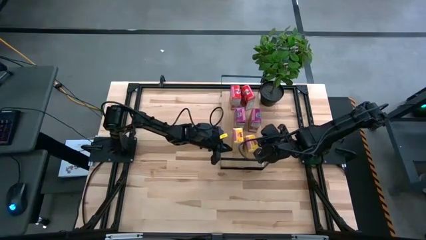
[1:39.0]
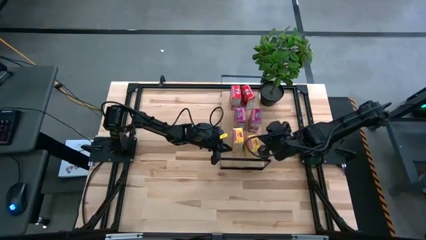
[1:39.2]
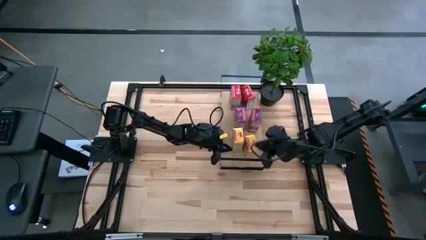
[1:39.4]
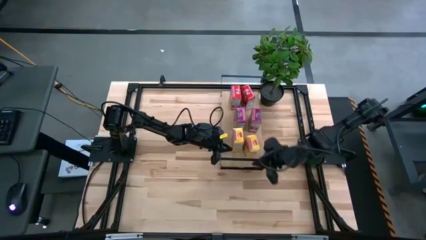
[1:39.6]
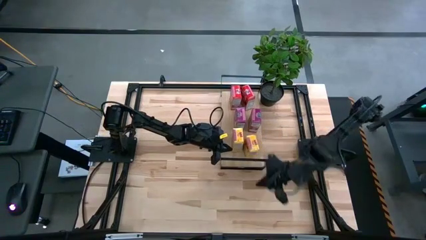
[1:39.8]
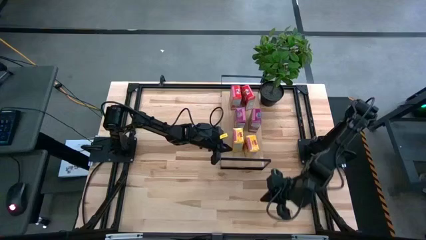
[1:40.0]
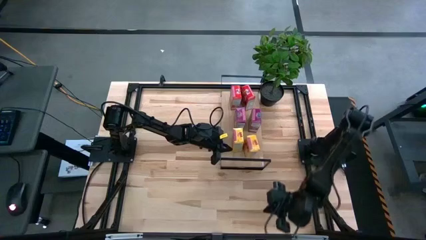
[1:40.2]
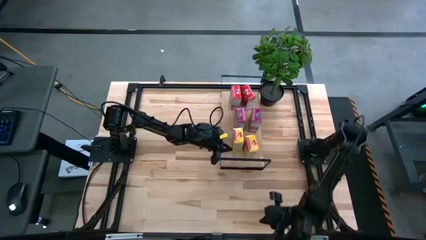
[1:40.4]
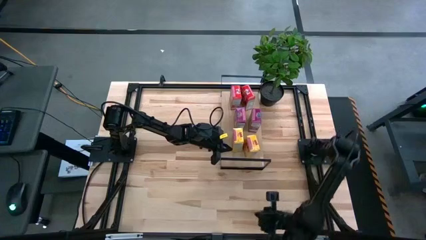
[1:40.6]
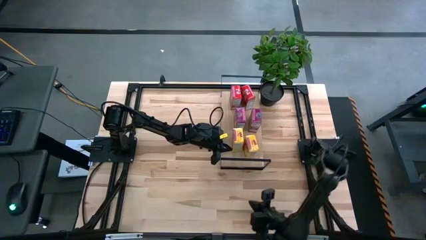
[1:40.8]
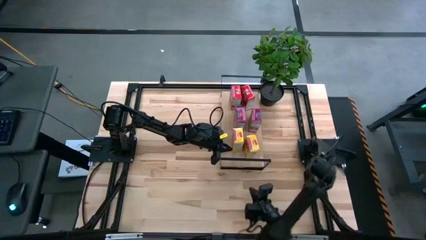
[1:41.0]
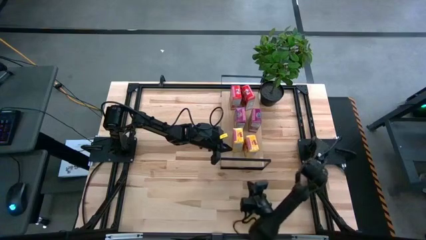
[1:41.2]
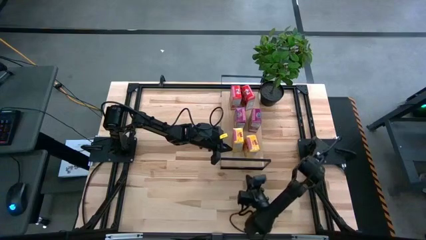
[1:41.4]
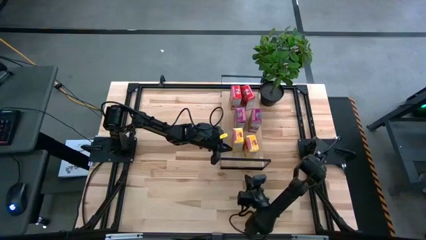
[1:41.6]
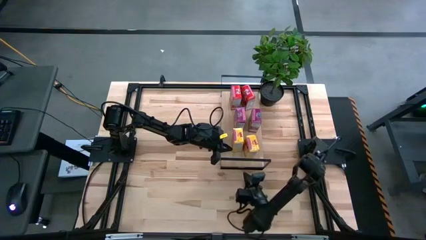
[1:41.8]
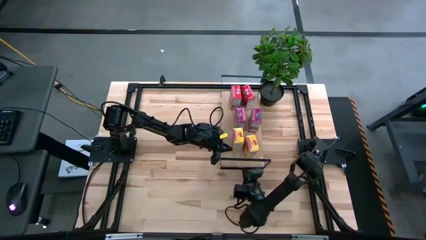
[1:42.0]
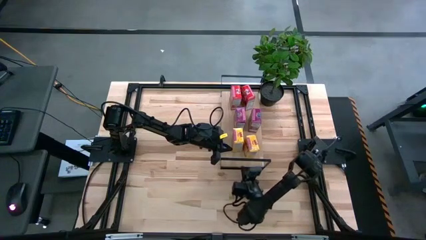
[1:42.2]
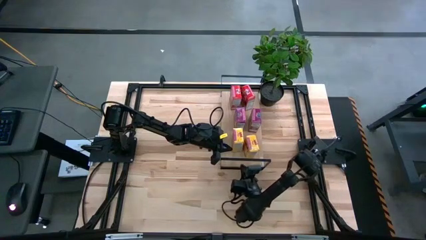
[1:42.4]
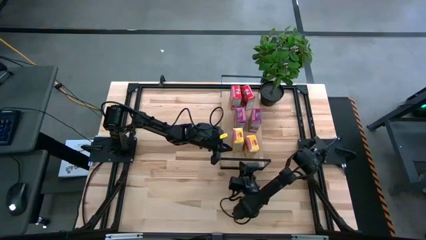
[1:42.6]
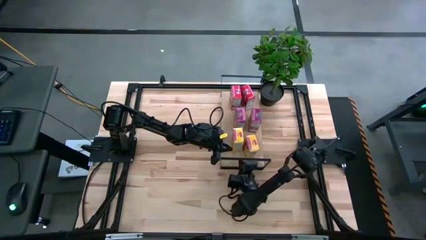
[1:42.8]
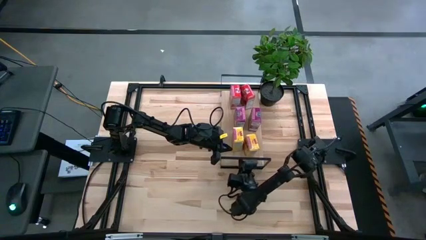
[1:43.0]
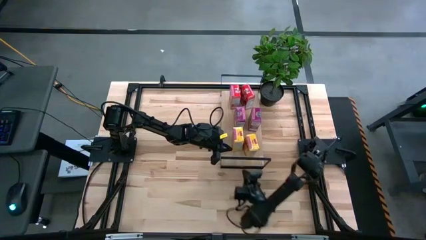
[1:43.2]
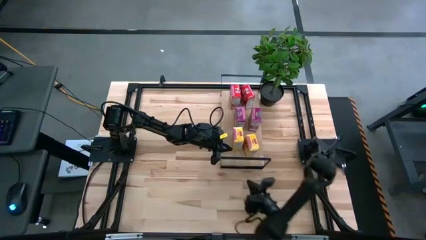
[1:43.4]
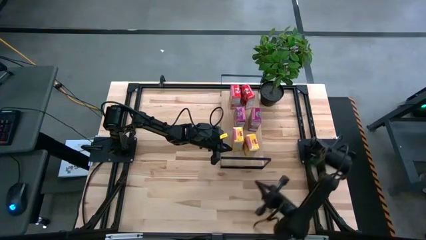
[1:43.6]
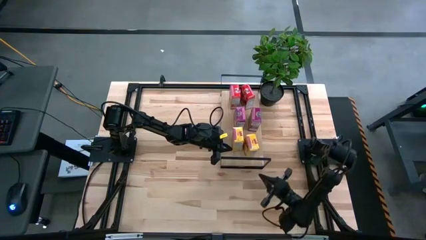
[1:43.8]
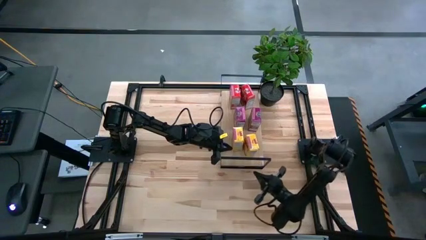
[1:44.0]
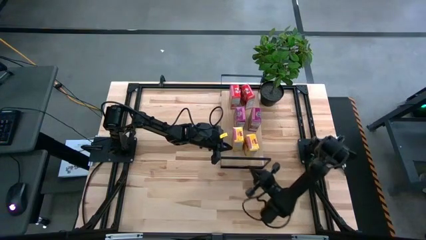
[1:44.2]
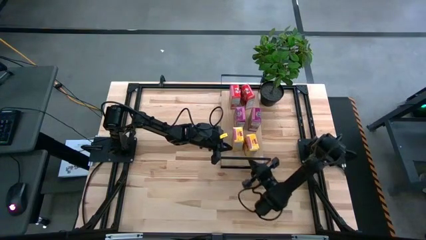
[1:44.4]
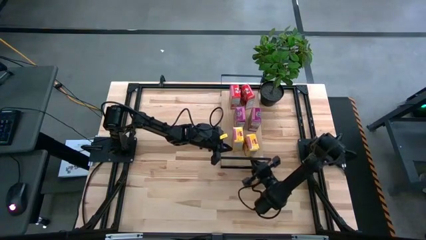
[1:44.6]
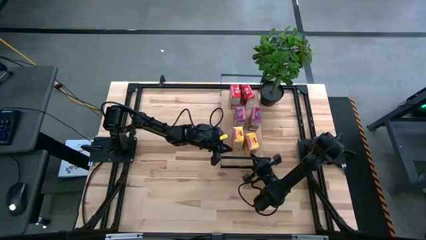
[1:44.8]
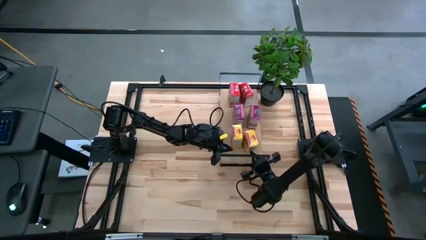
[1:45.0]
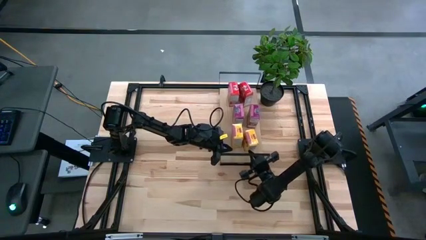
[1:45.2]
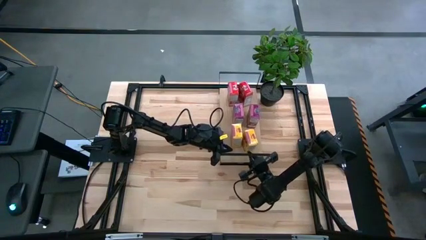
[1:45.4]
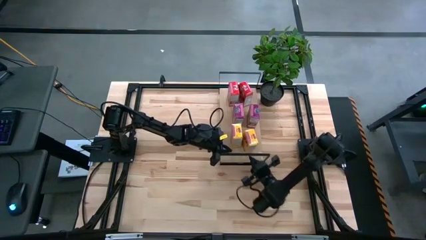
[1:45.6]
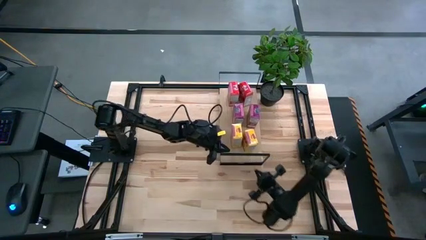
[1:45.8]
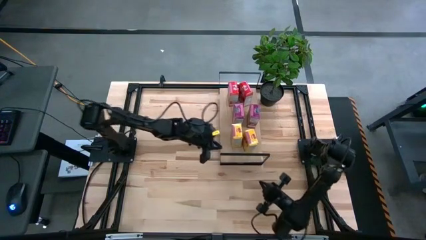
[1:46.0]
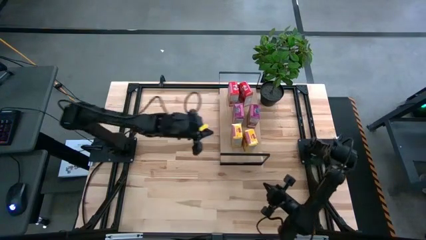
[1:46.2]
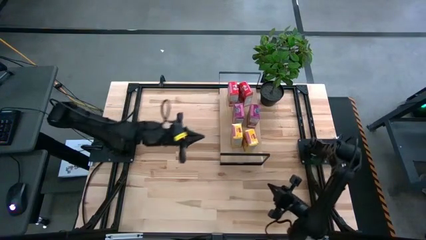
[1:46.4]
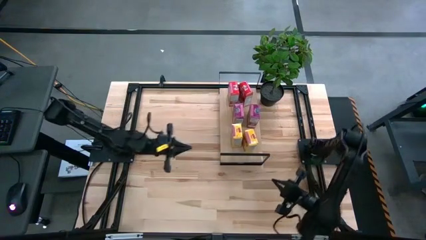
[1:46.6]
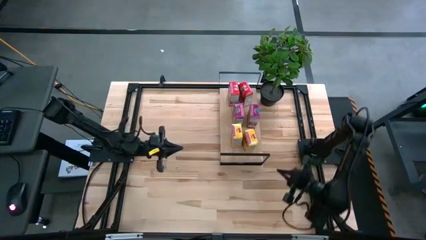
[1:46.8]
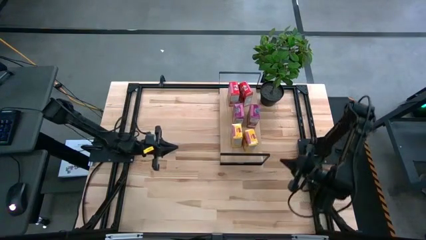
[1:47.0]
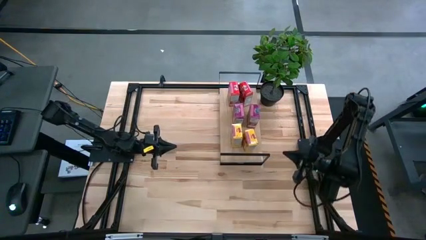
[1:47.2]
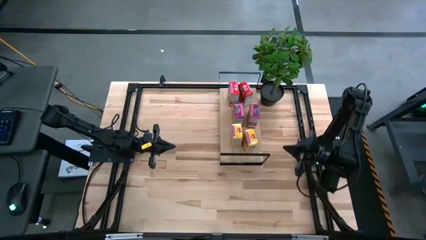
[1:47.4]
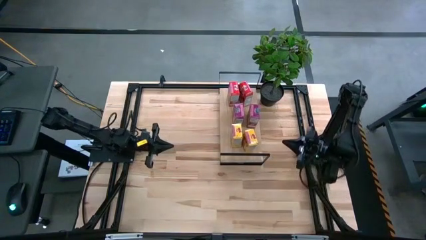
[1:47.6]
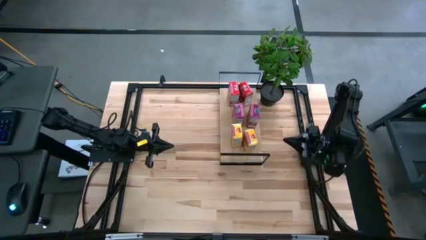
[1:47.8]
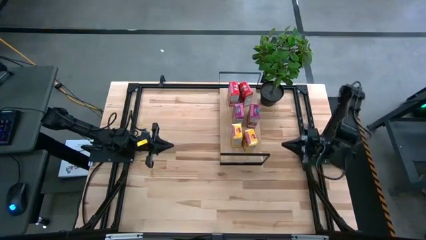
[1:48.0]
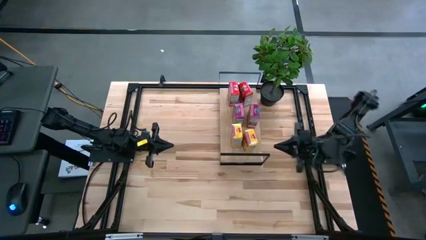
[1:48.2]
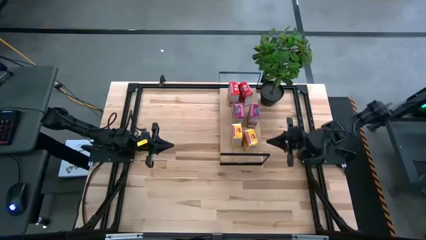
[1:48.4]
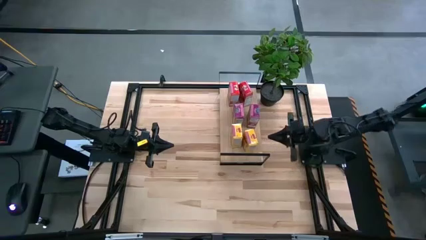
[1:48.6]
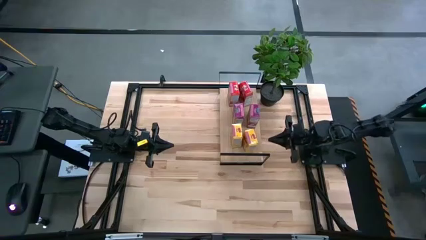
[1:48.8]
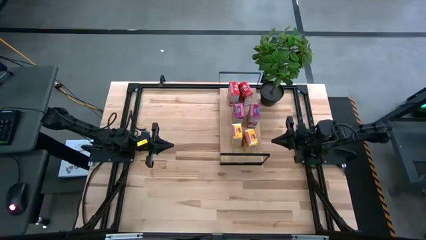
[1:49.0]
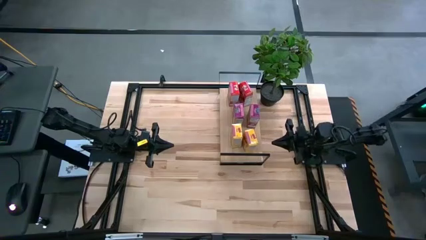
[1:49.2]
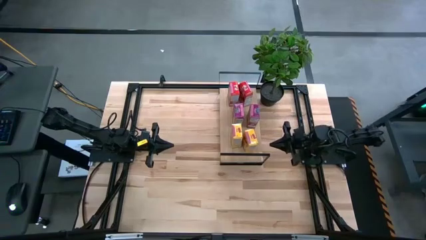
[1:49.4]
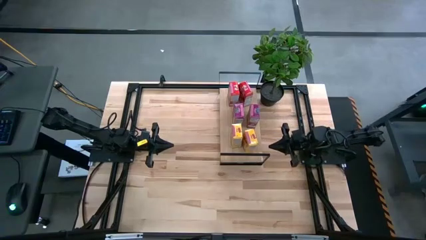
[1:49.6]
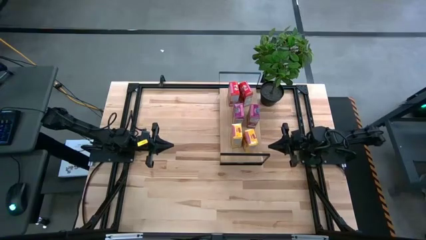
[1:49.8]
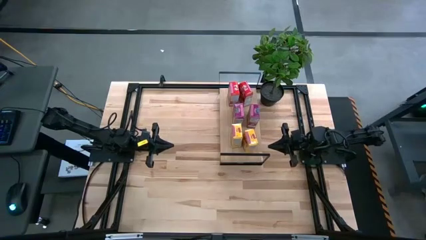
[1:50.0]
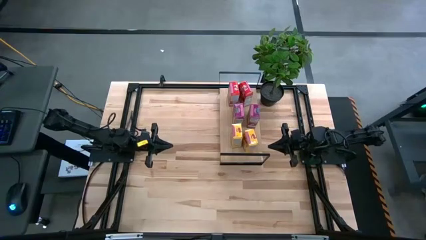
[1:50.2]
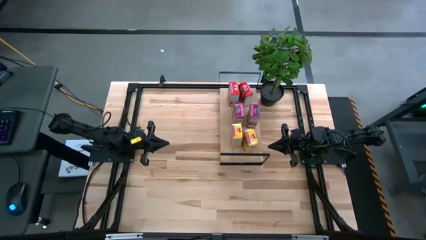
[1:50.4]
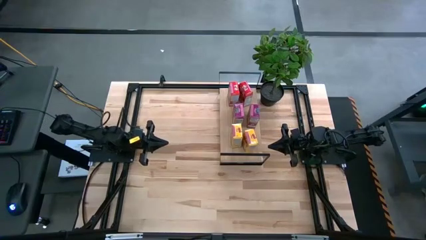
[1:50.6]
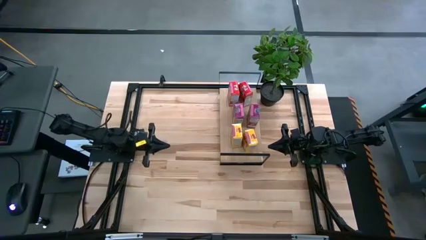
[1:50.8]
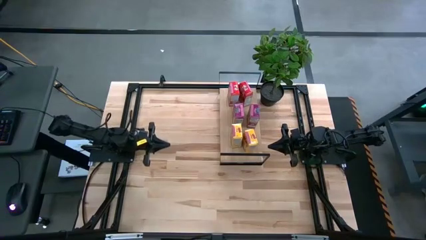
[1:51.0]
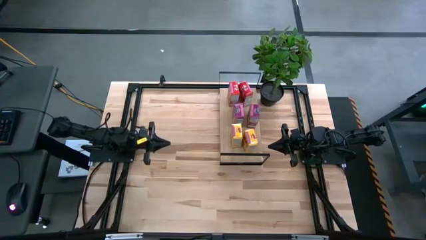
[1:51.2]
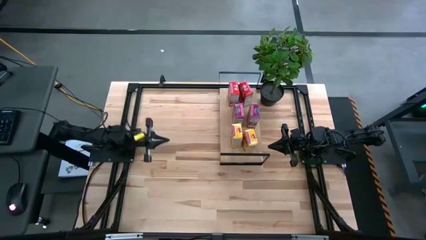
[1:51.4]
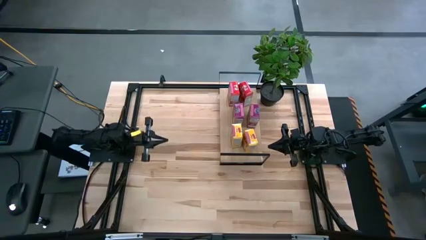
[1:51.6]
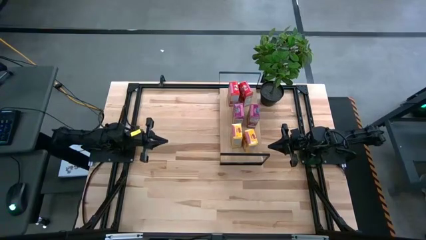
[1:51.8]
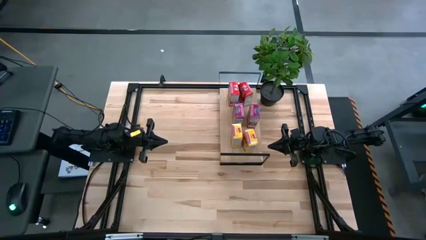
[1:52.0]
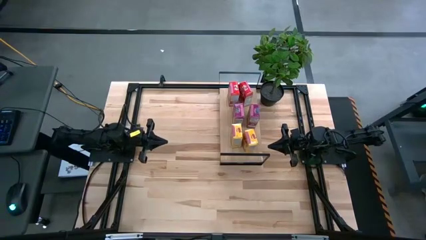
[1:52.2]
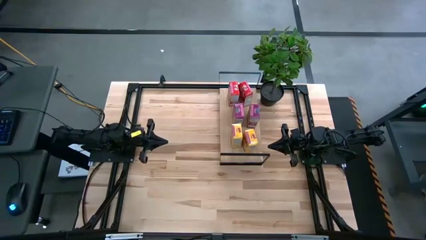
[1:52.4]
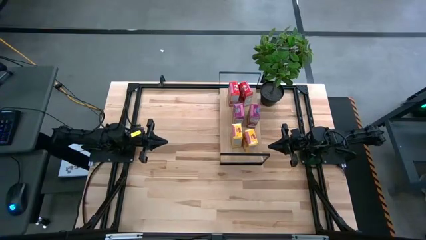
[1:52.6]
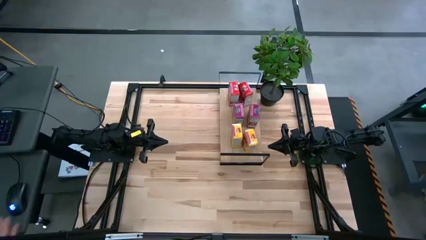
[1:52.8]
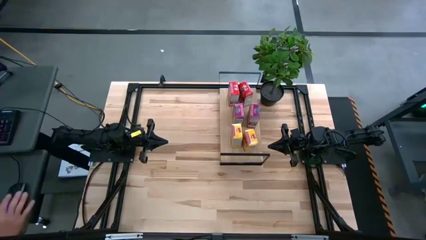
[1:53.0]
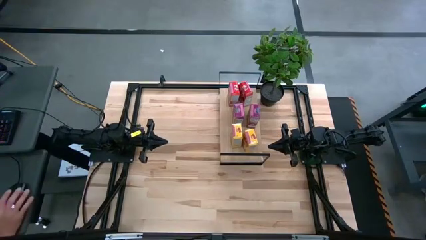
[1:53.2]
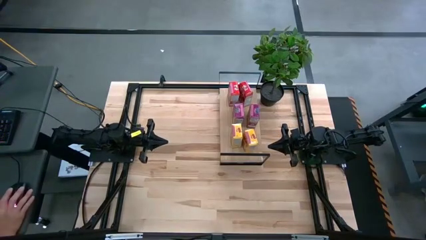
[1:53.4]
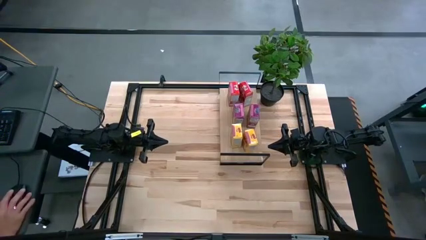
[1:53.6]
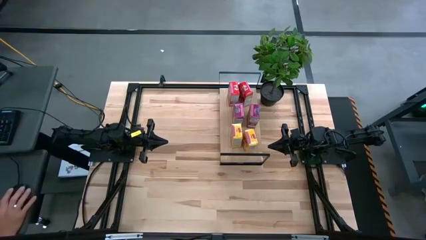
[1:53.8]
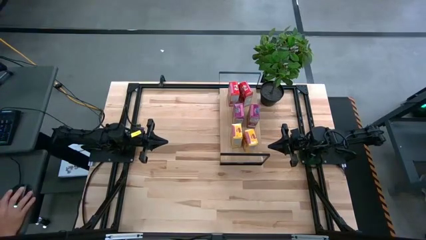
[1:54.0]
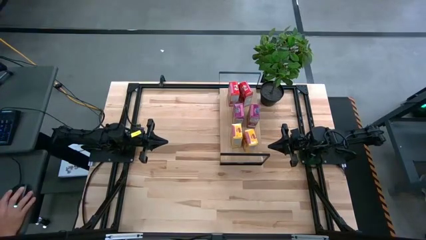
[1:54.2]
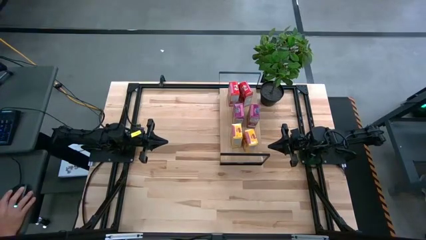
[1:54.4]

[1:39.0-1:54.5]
Task: Stack cereal on shelf
Return to Home Position

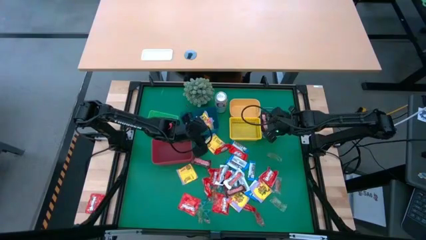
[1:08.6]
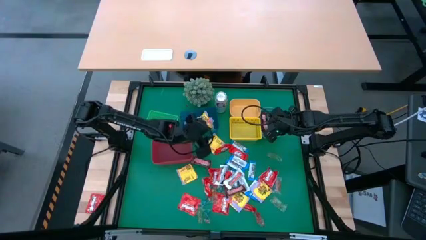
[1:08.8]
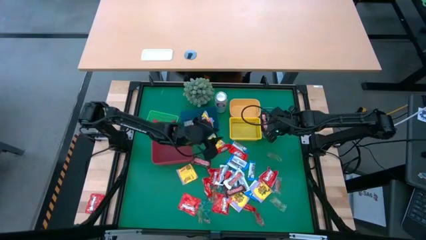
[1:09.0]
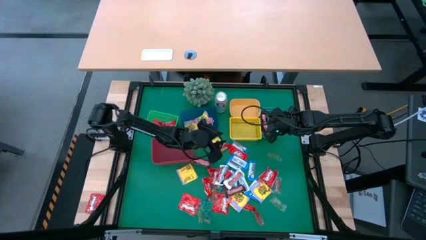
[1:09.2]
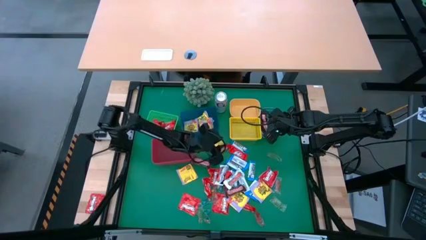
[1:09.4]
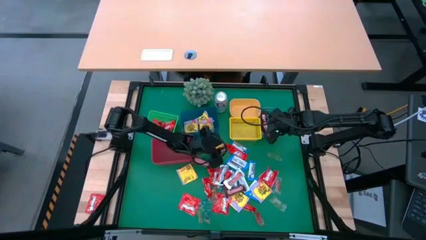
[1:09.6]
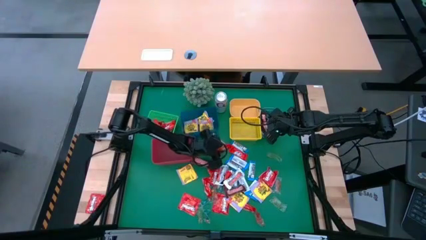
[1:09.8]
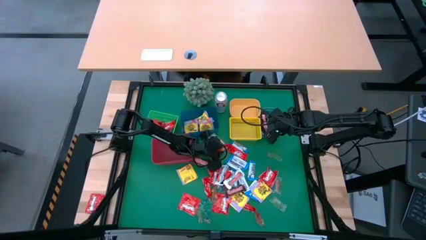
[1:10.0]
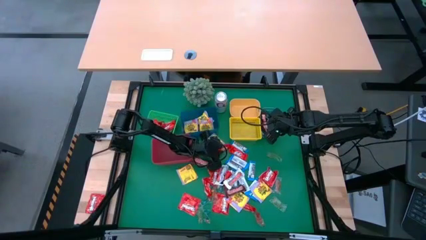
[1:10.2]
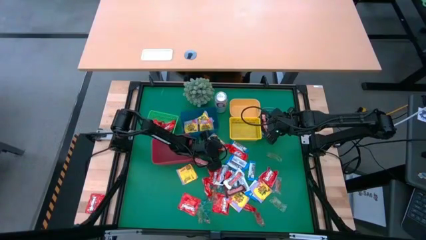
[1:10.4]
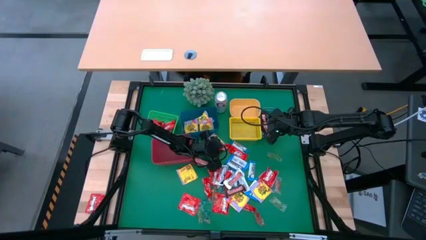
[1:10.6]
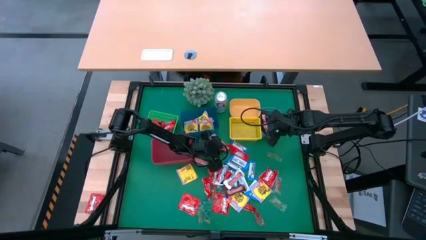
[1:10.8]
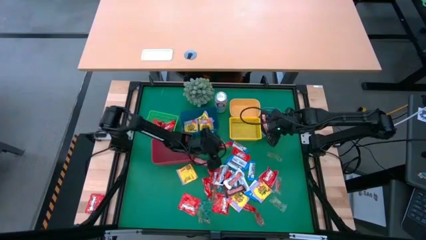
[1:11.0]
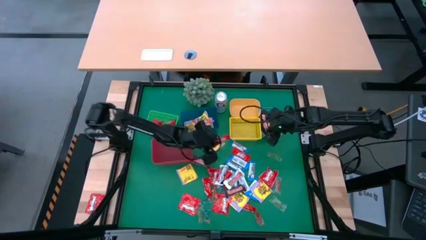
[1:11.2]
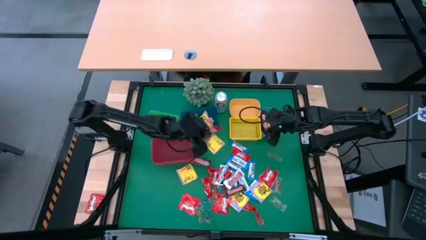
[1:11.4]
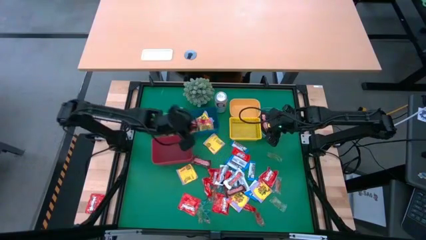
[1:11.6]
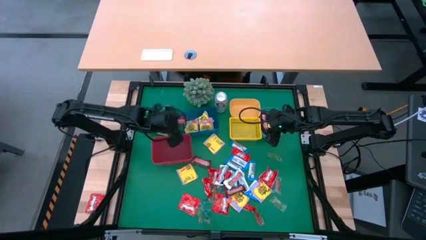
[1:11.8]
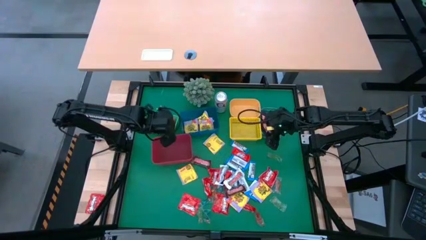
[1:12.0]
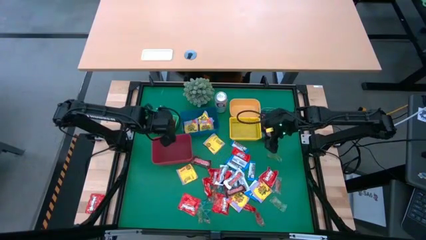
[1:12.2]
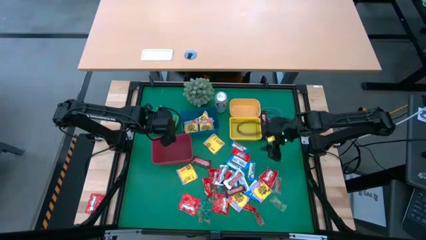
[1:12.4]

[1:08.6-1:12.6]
Task: Sort candy
Put the red chocolate bar into the green bin
